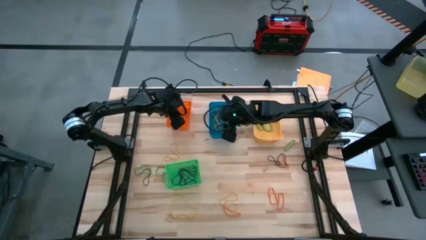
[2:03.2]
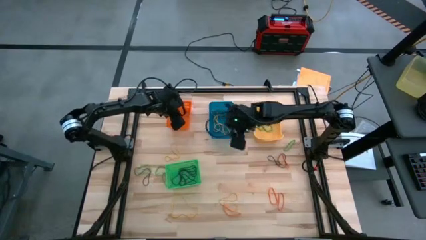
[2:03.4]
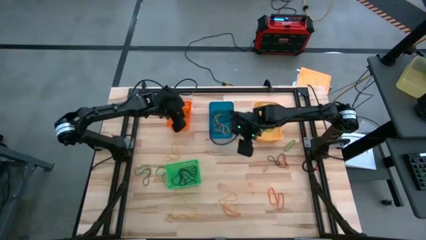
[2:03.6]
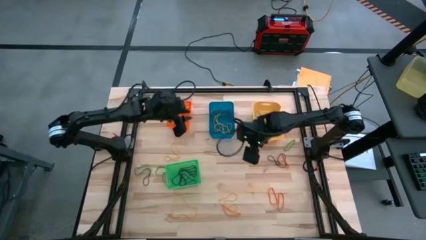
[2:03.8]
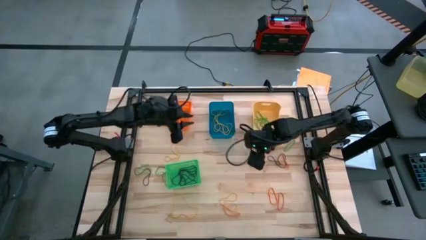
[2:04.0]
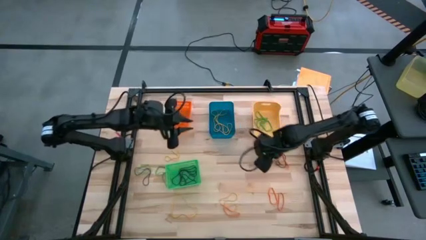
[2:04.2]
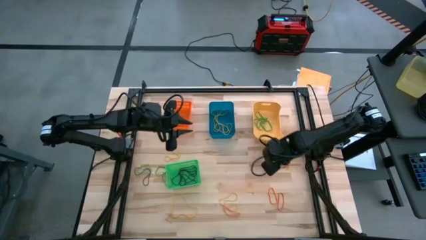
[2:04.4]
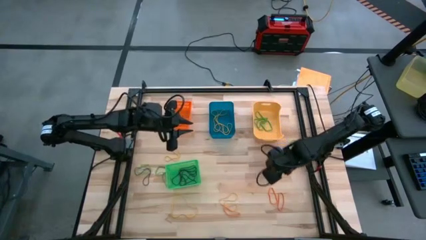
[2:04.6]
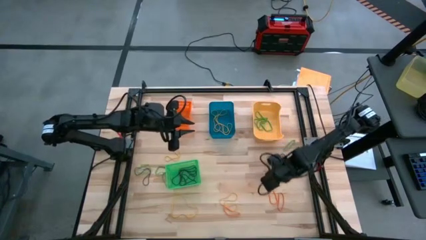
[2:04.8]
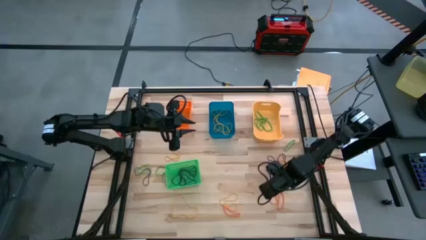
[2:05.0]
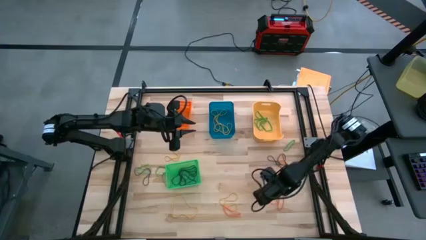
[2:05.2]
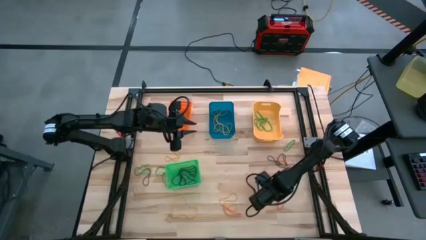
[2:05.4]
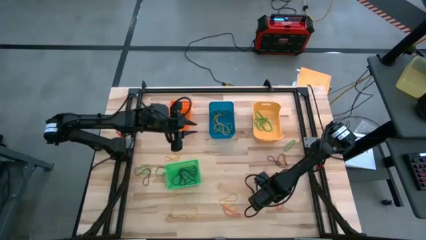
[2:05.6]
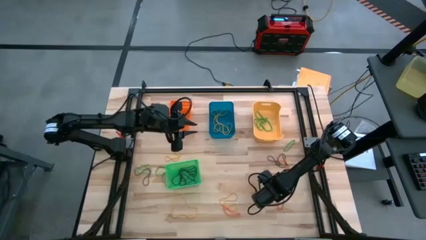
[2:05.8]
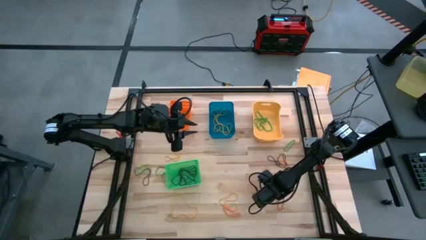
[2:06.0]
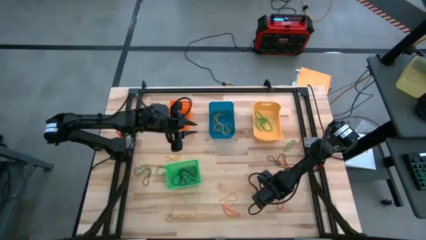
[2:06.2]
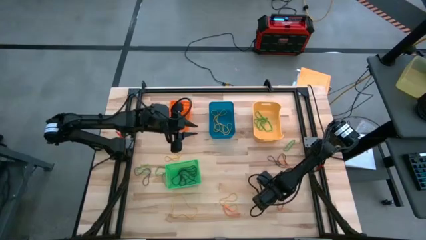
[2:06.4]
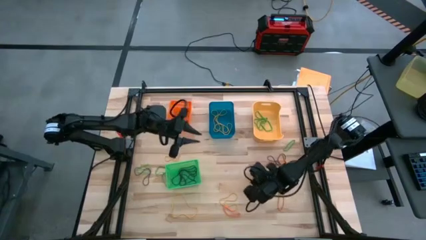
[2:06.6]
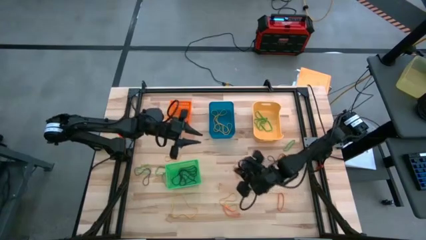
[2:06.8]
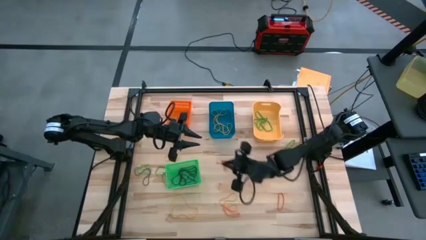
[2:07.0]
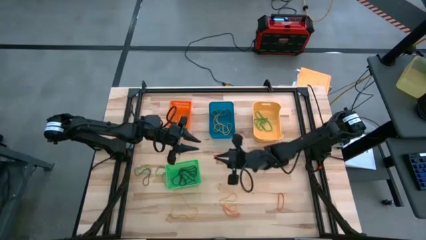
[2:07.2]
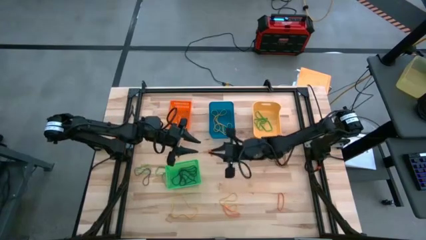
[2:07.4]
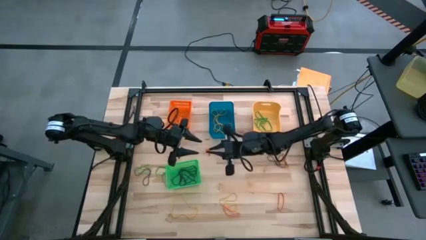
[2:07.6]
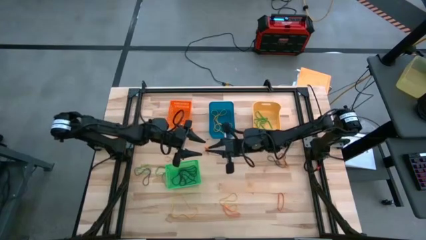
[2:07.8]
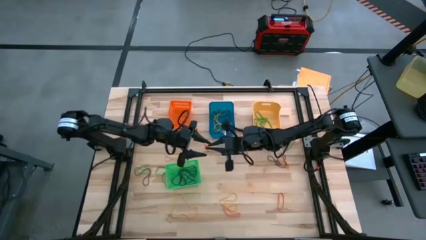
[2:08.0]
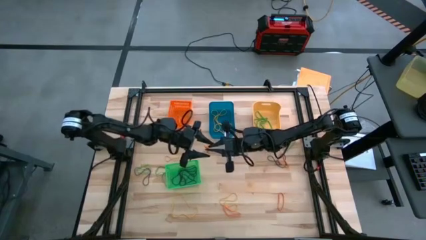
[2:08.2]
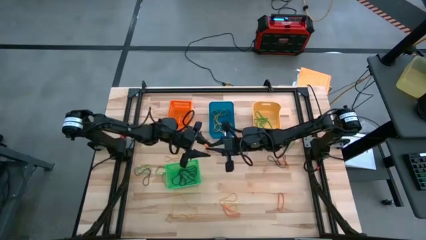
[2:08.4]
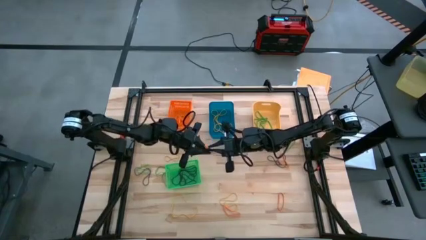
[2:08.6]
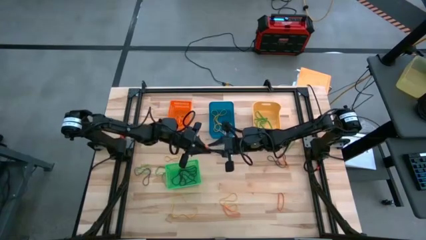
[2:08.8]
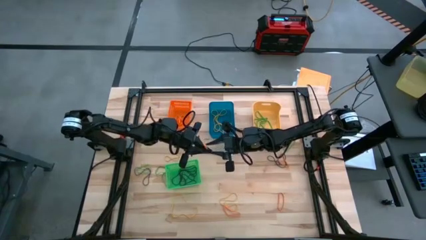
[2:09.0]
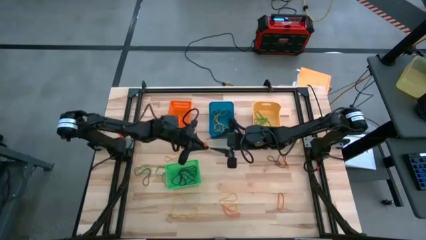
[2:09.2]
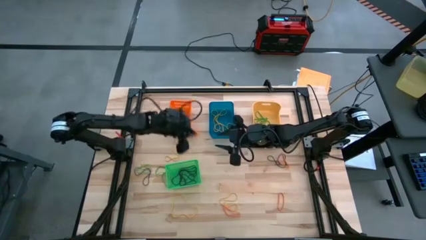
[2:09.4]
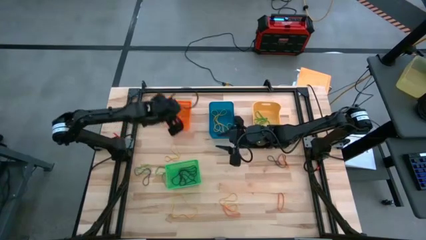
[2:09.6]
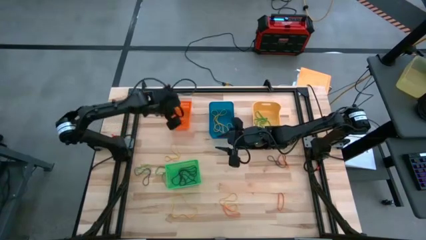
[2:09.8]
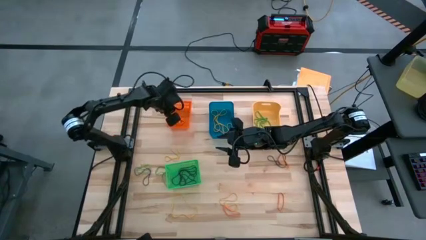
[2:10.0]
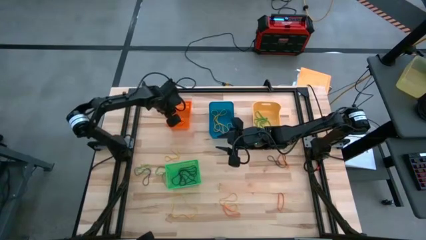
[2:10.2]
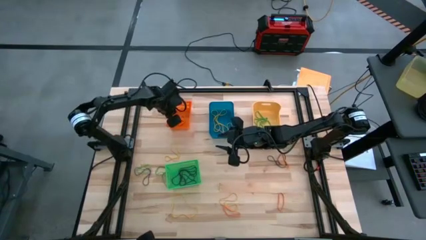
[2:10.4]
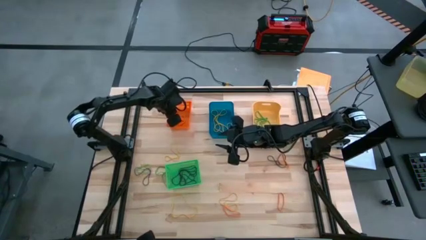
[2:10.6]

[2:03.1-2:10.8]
Task: Sort rubber bands into baskets
Put the orange rubberband into the orange bin

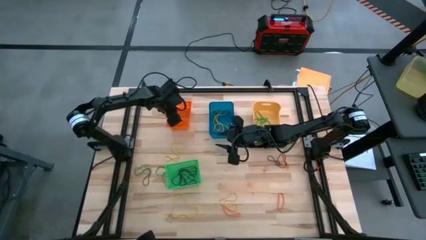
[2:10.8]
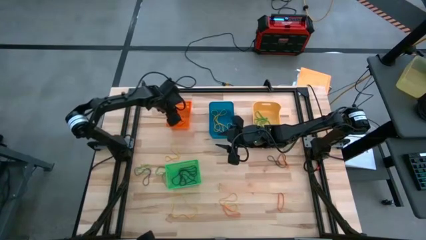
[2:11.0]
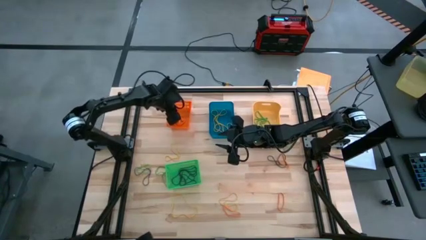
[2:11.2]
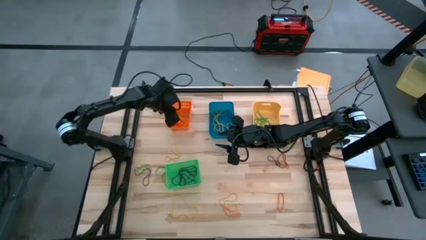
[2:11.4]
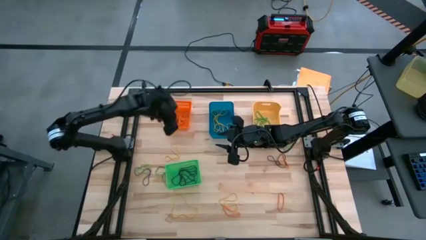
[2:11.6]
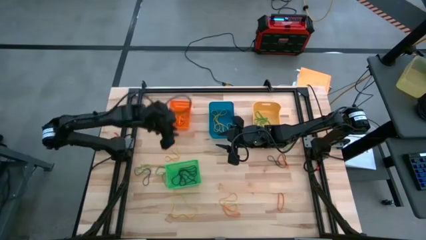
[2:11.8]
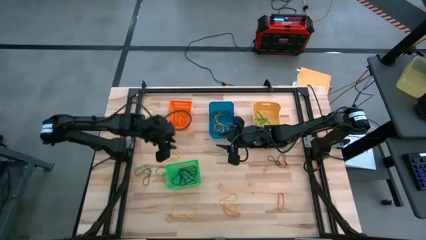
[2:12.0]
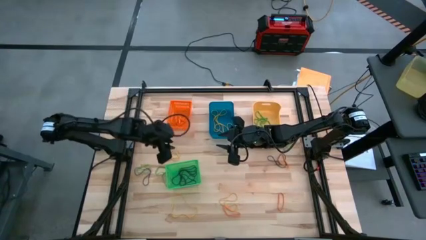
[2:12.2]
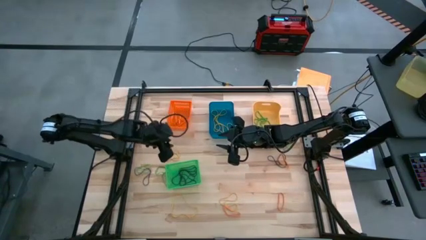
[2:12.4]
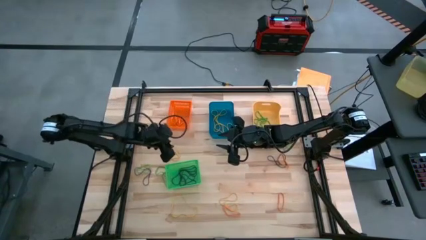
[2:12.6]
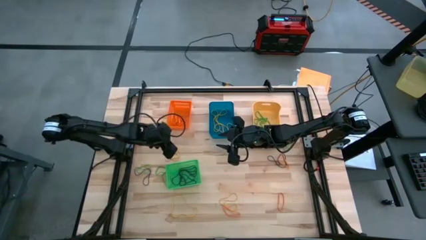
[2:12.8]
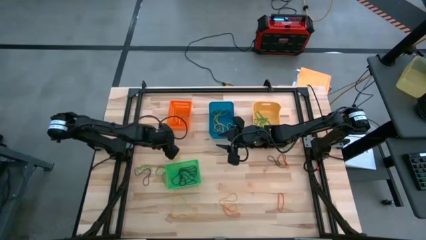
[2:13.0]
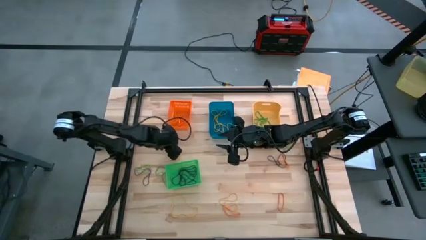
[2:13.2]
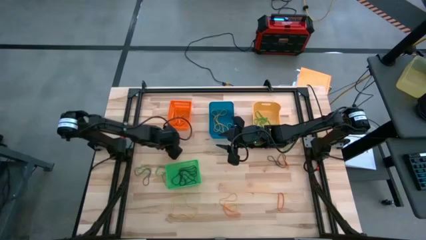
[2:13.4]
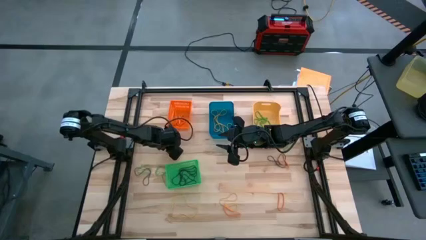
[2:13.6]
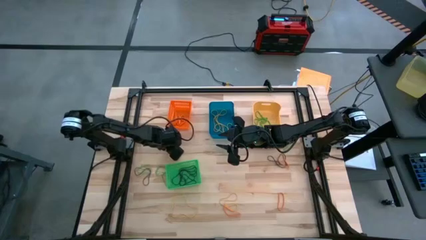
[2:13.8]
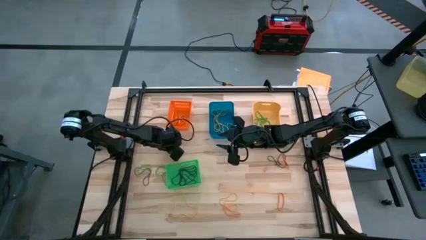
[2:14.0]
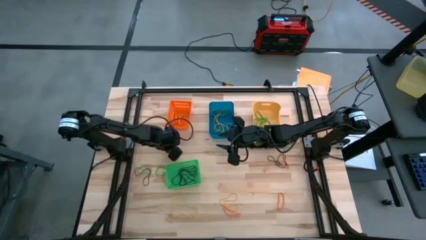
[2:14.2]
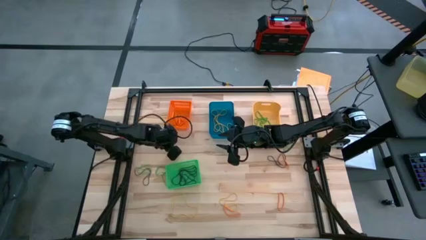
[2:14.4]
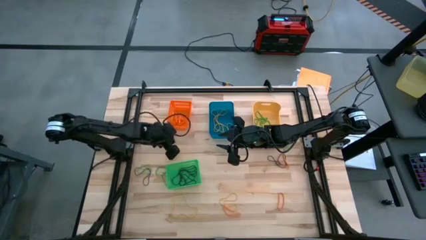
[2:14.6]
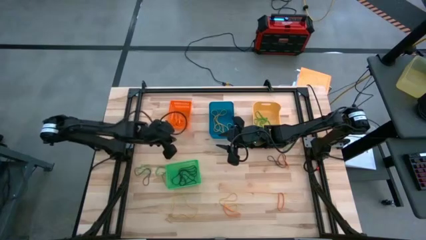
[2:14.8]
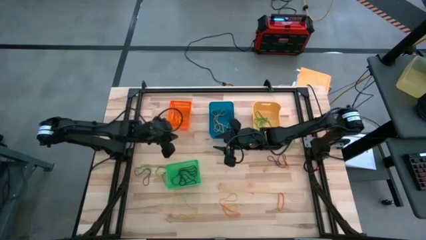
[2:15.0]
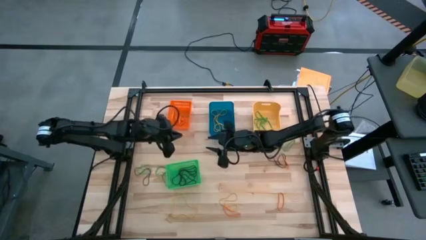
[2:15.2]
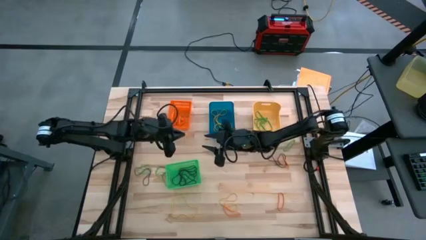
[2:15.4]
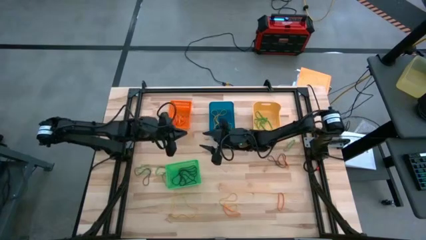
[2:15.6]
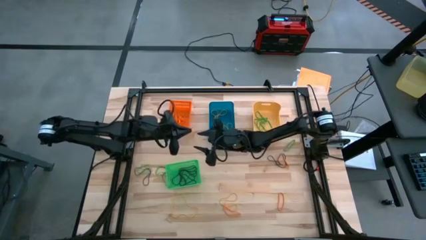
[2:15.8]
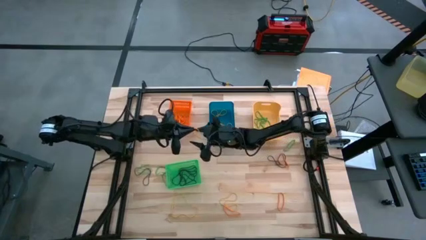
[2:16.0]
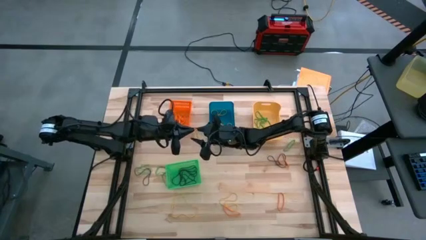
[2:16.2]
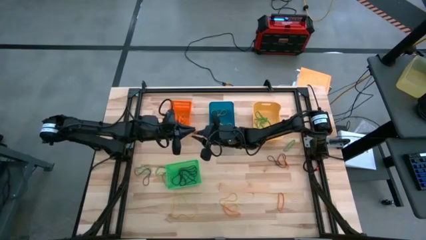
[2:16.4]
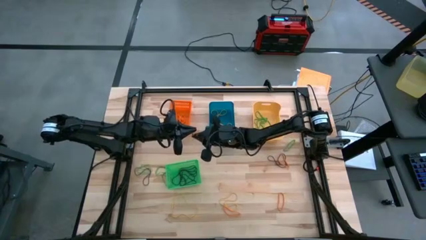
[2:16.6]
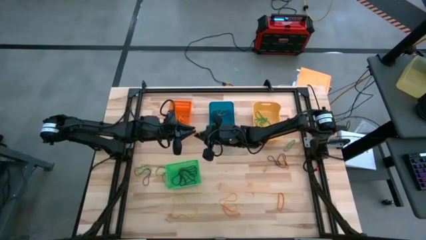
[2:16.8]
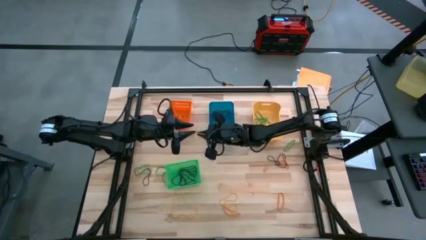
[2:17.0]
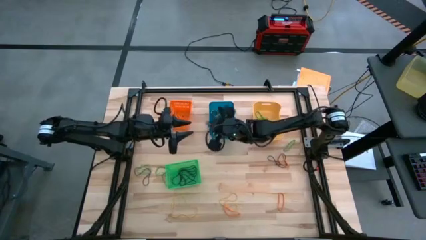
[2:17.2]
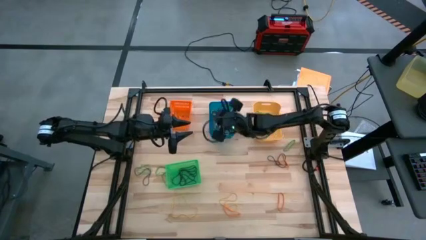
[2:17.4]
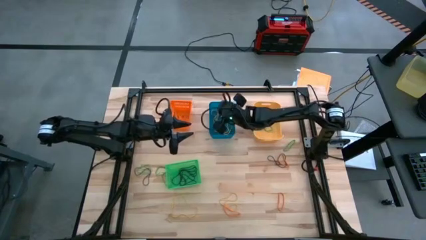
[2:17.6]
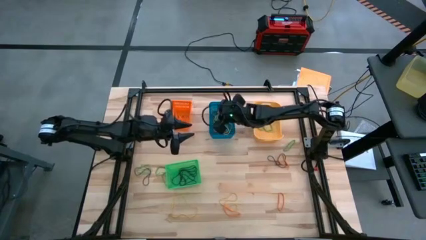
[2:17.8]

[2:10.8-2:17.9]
Put the yellow rubberband into the blue bin

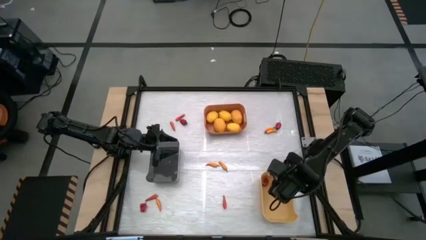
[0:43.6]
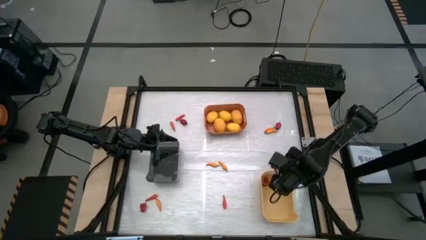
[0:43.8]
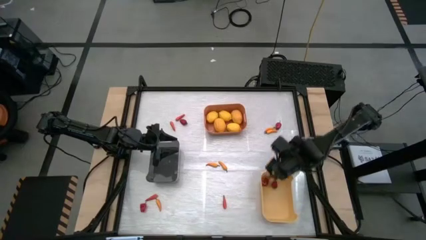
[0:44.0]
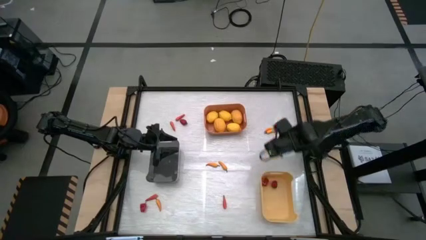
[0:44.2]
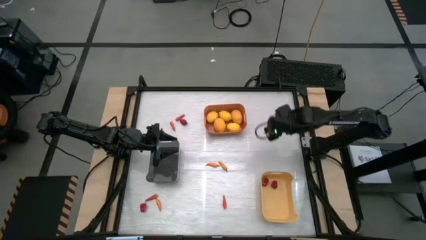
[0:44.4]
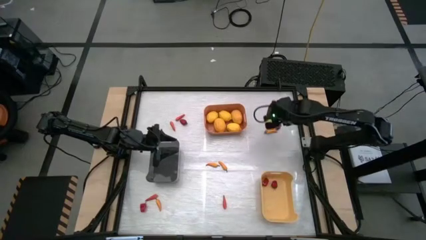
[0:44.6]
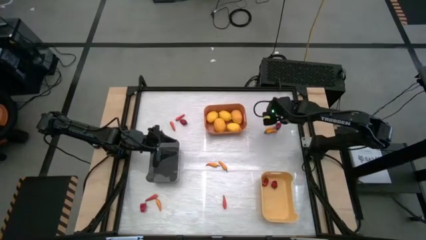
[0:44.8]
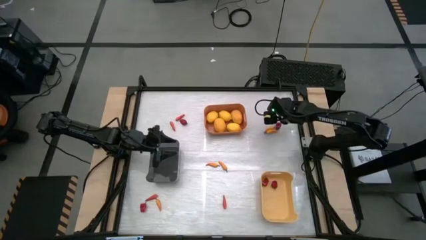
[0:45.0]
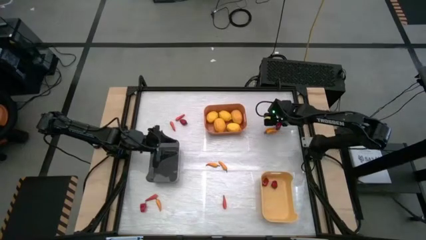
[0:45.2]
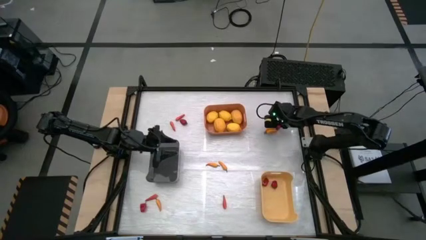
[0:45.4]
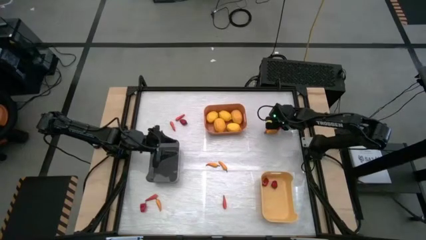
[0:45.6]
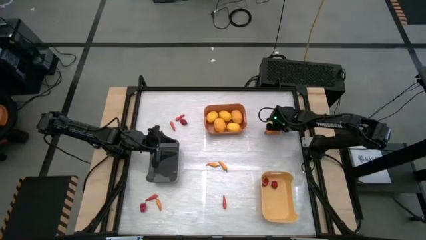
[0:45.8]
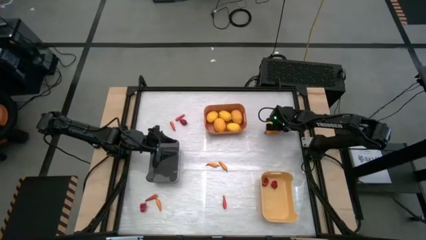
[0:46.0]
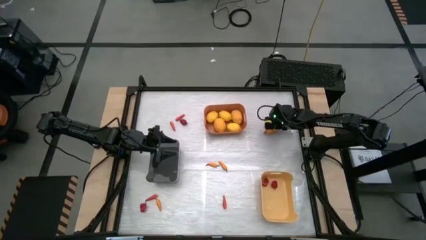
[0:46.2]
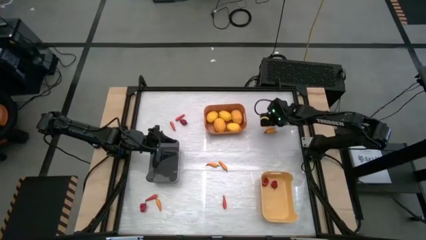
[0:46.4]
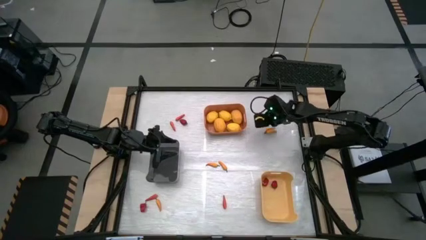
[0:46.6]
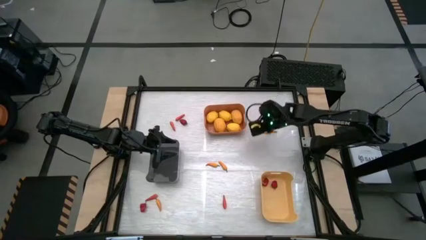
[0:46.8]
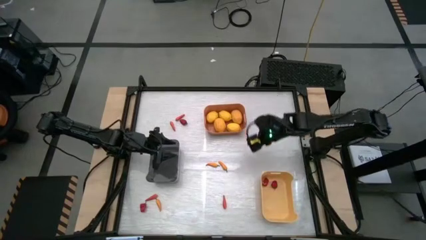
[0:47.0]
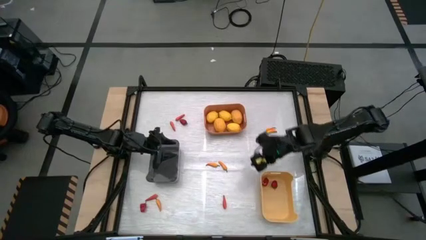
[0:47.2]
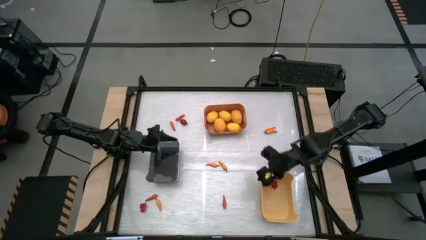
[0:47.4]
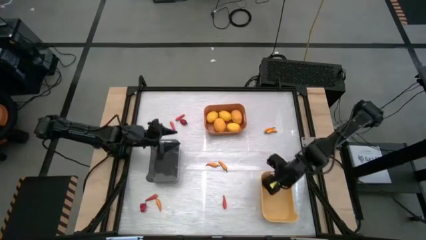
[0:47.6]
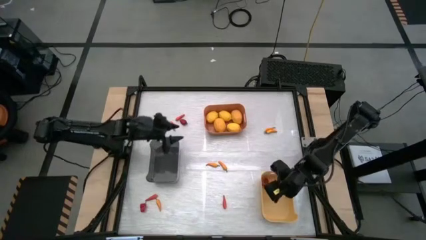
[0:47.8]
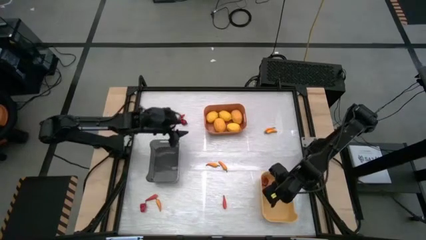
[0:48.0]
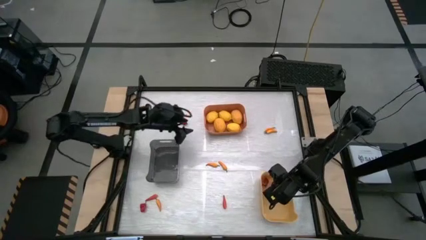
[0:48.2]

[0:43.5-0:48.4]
Task: Sort produce into baskets
Put the red chili pepper into the yellow bin
